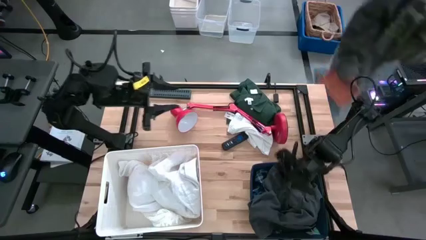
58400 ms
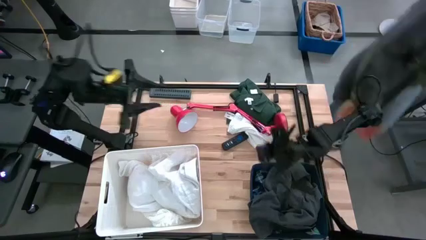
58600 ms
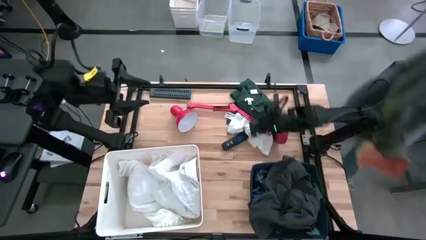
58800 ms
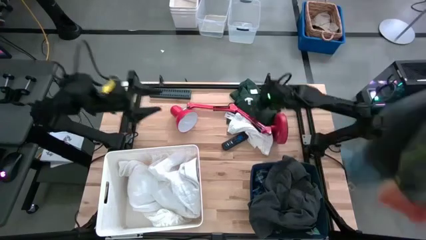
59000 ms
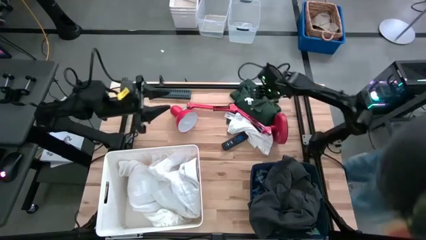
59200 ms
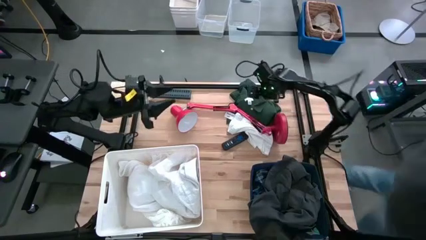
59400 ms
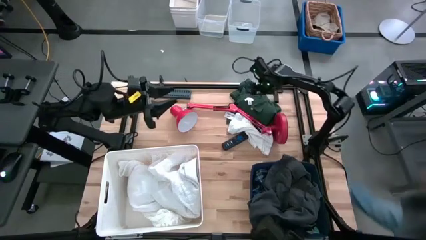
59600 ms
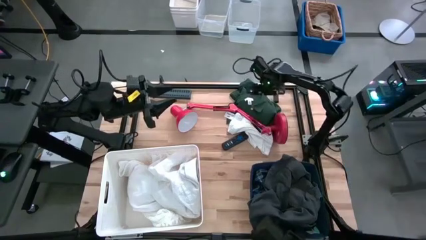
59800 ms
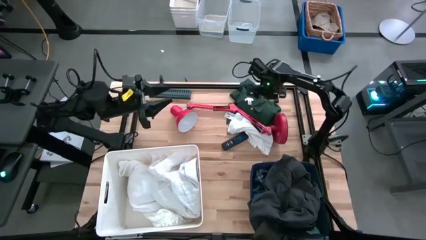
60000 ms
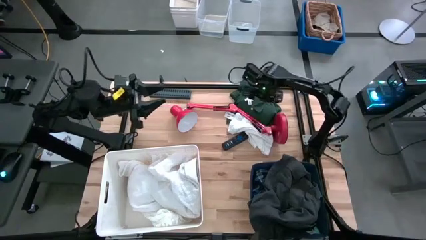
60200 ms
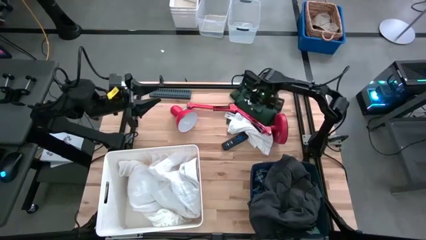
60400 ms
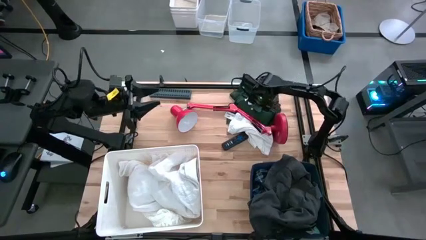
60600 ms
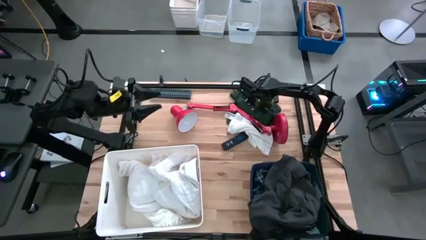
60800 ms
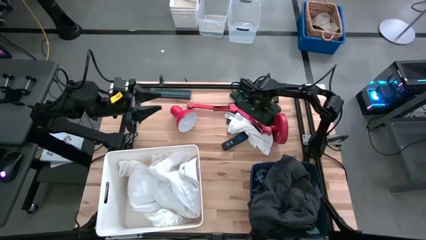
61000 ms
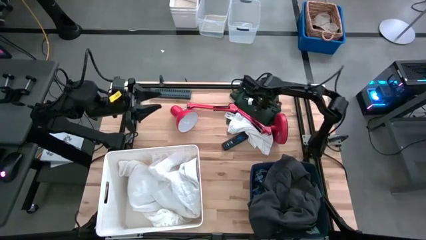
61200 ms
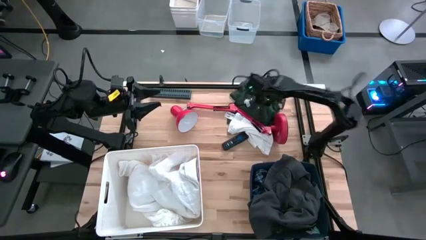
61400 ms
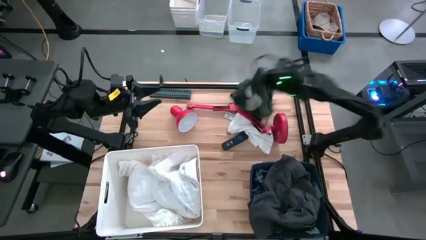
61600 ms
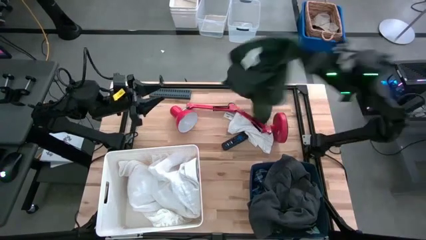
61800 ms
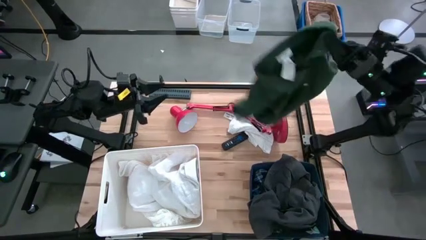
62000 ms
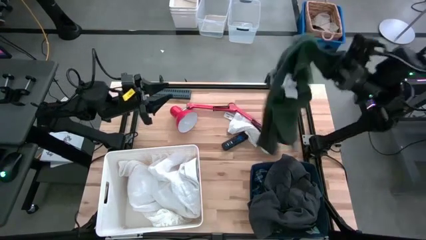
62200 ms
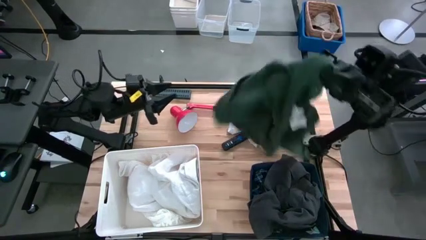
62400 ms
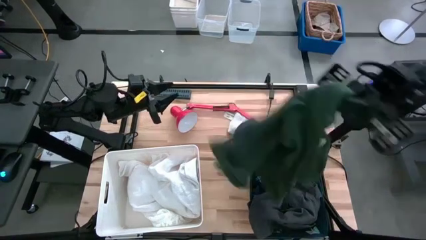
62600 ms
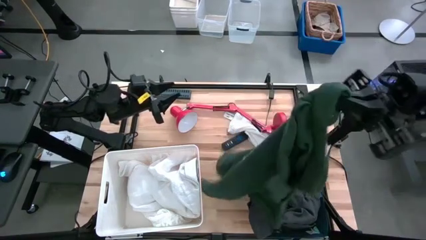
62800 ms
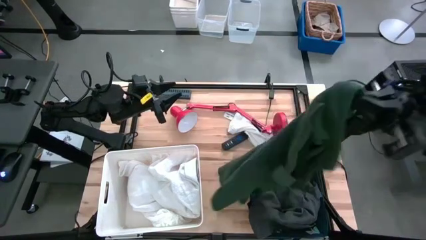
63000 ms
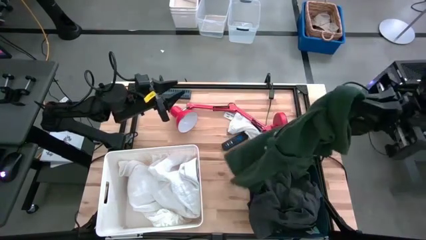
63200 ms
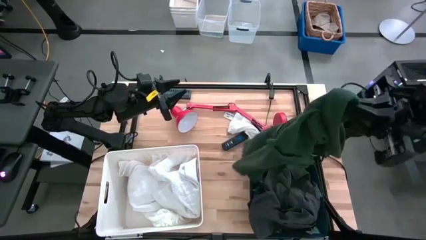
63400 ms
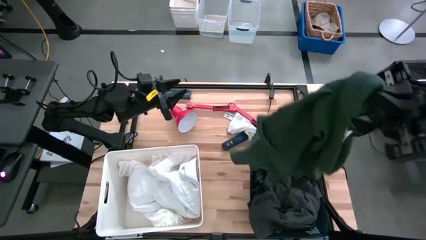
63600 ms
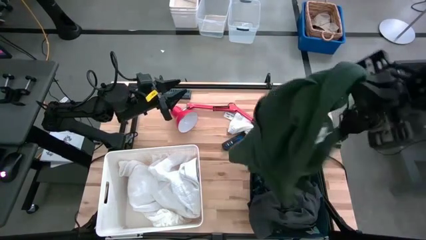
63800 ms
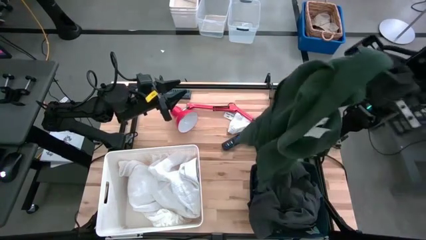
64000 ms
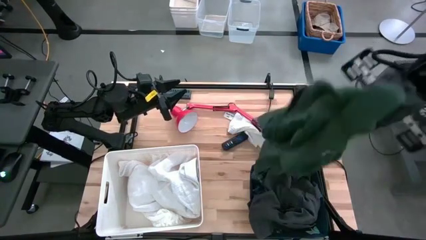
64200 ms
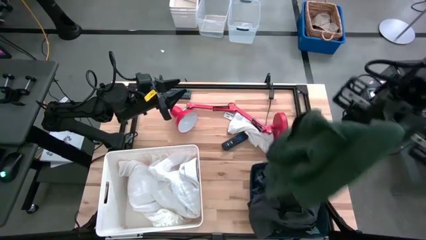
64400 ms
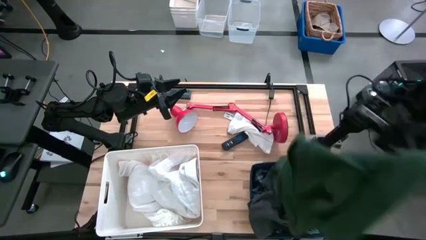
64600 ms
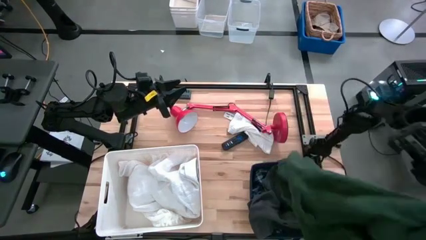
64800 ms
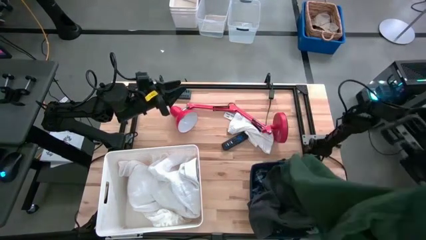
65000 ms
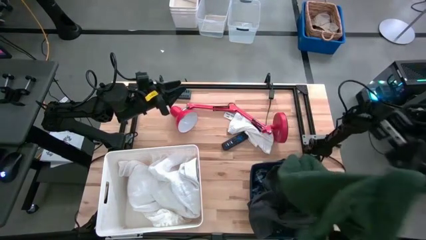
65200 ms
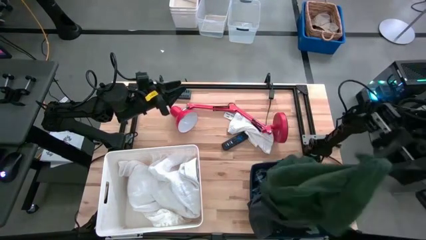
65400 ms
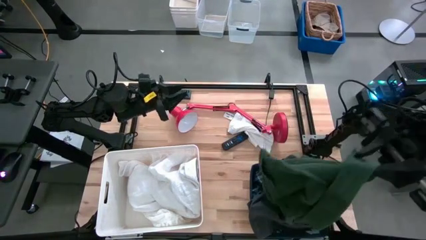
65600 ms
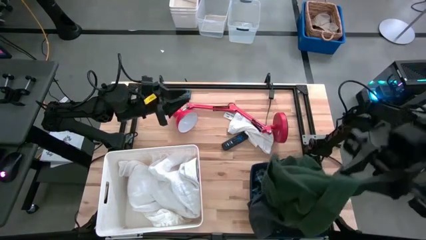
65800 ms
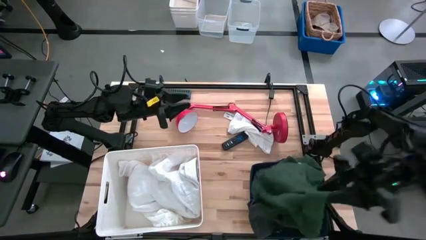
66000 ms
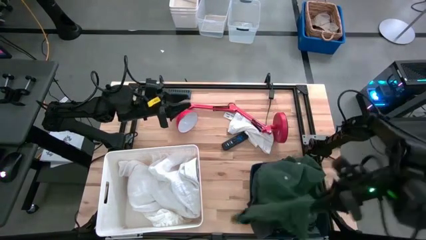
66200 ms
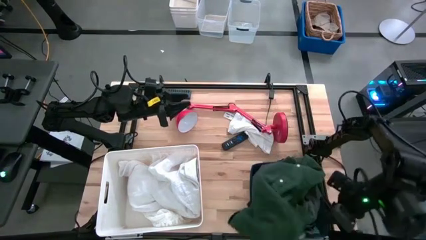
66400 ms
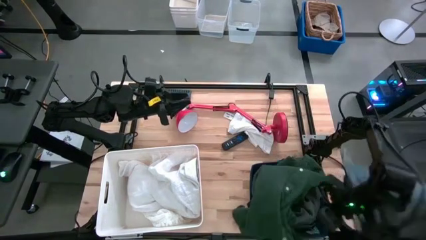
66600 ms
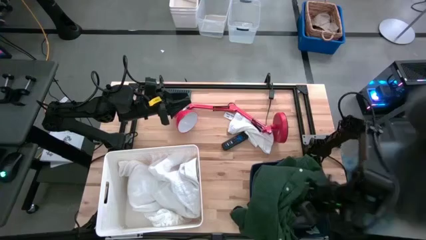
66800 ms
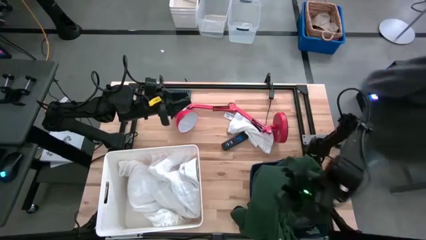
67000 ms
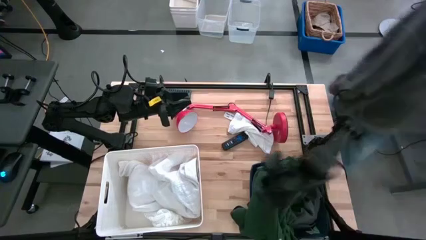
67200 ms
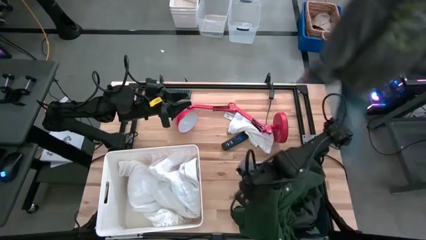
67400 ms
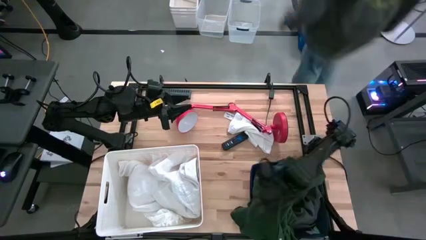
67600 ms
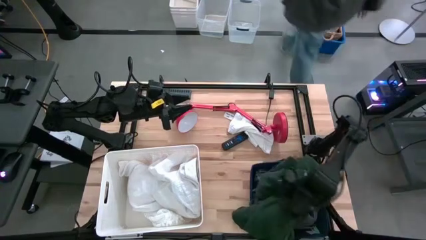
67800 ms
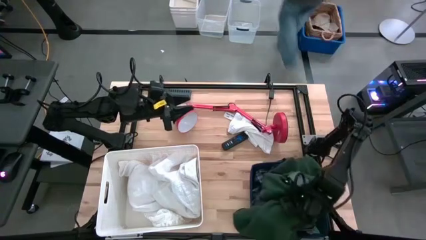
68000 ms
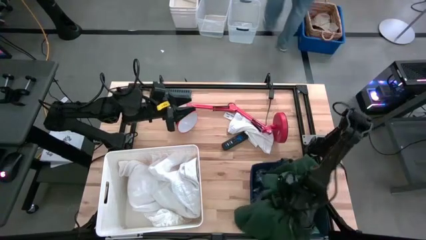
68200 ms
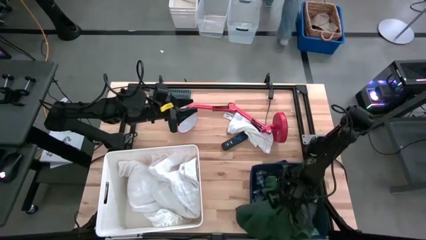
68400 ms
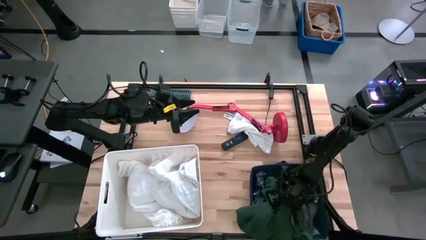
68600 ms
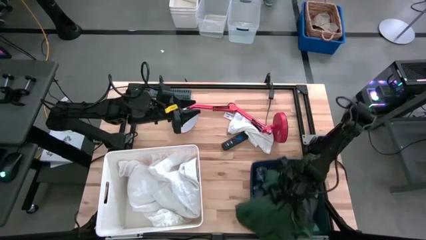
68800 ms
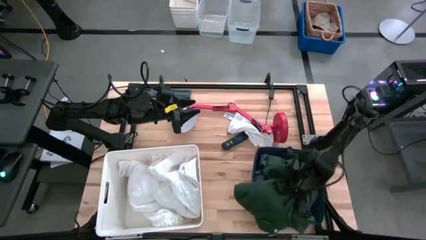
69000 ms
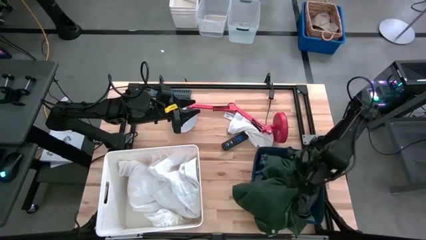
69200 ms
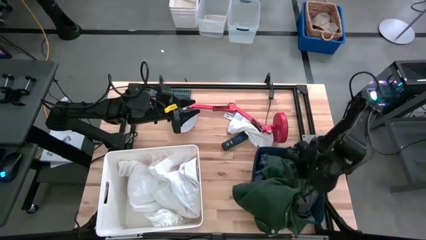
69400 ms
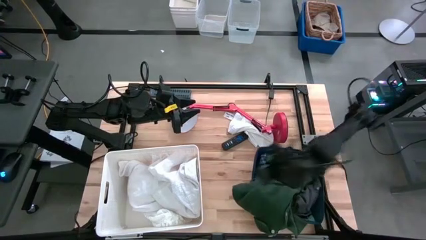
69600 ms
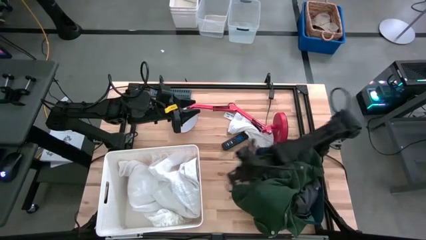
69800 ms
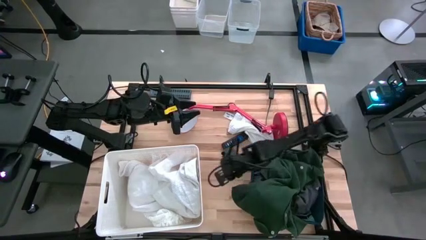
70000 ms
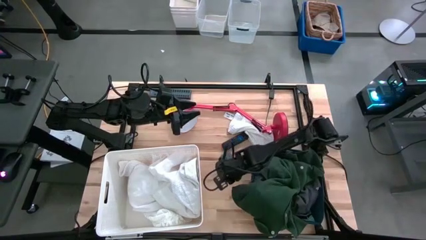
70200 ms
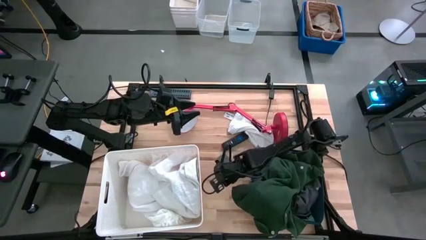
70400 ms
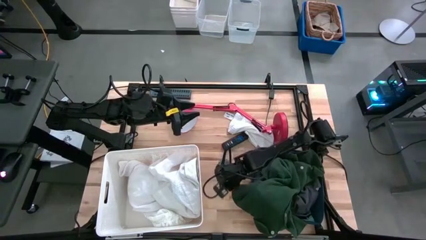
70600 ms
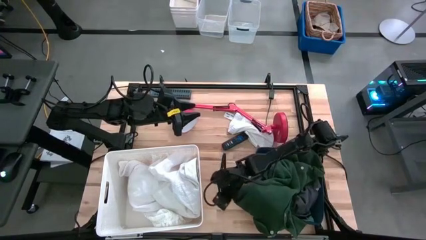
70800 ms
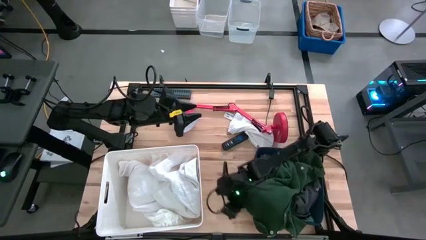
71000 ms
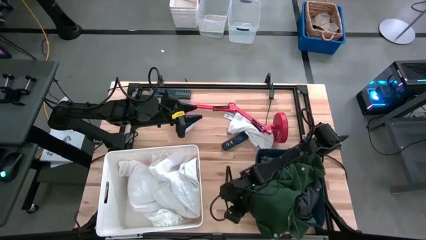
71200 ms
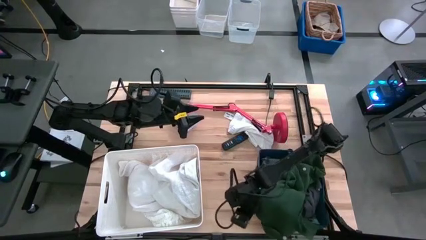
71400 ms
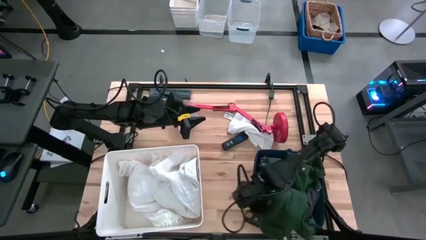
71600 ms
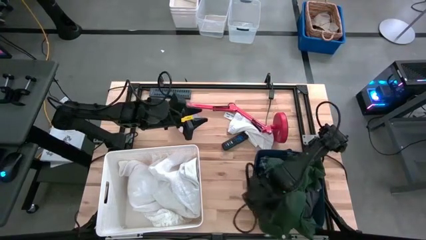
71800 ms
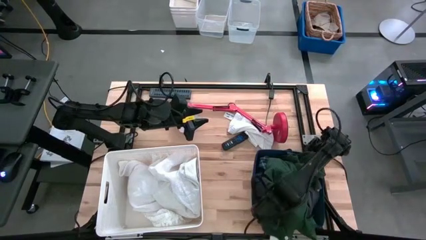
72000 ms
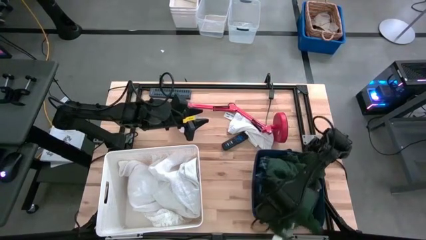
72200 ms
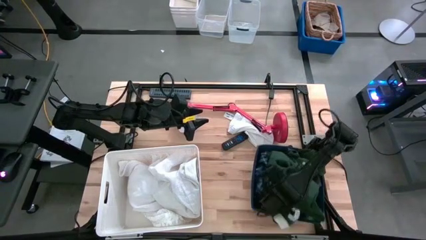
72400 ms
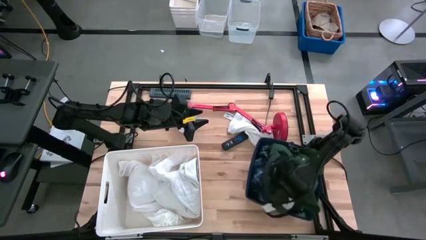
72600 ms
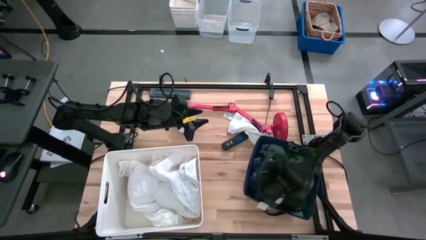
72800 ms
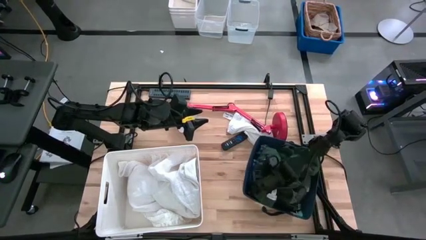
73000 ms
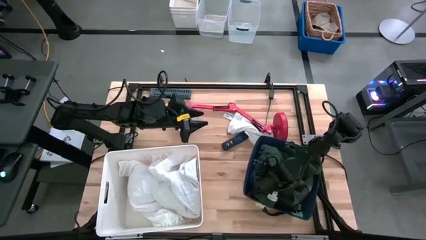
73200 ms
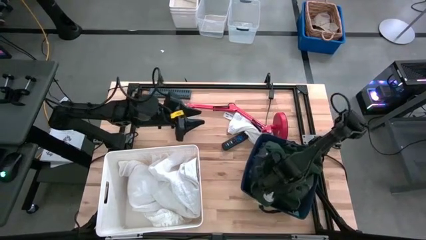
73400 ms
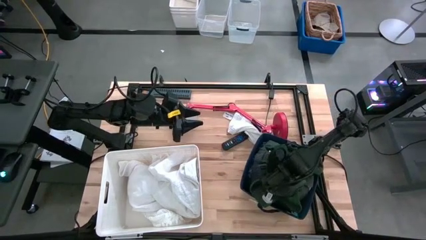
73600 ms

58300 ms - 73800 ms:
Task: Sort clothes
Put the green shirt into the blue bin
